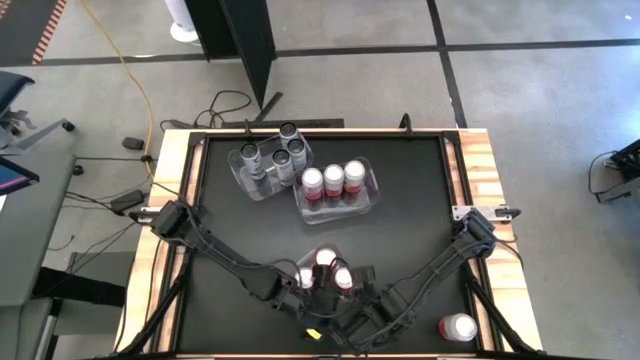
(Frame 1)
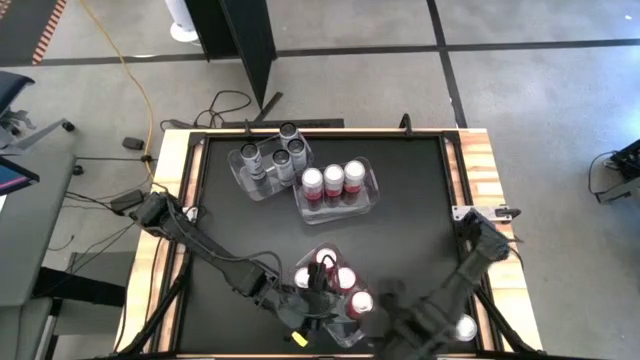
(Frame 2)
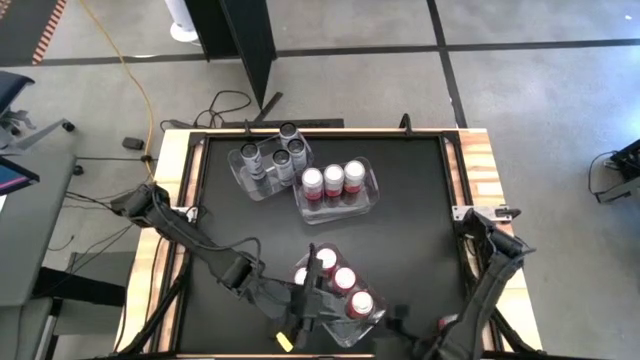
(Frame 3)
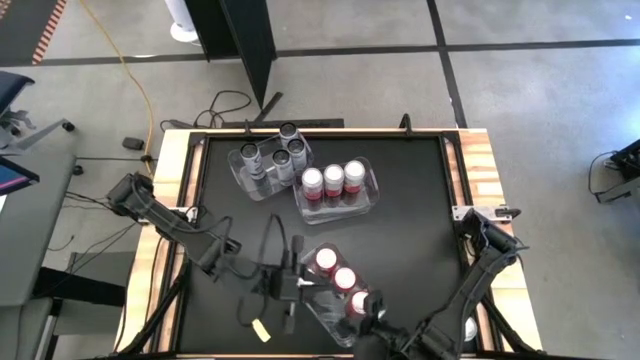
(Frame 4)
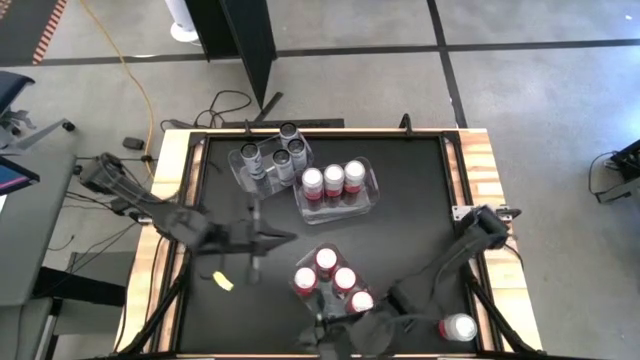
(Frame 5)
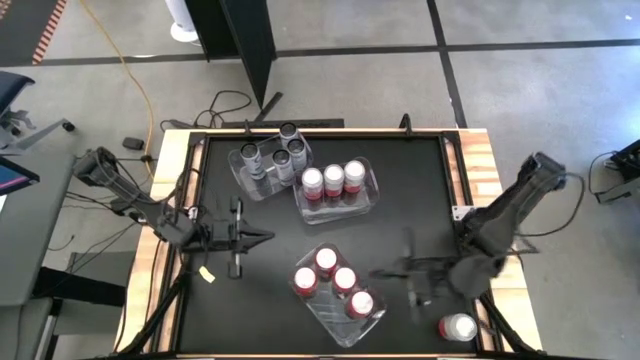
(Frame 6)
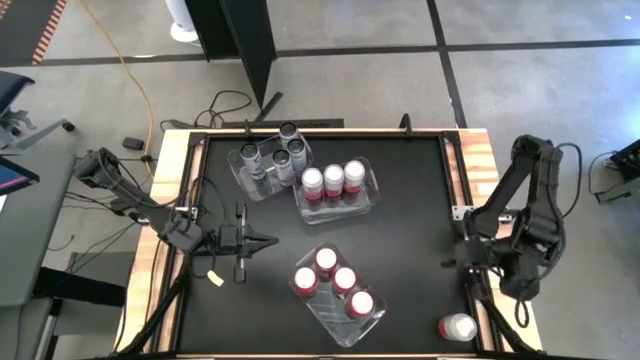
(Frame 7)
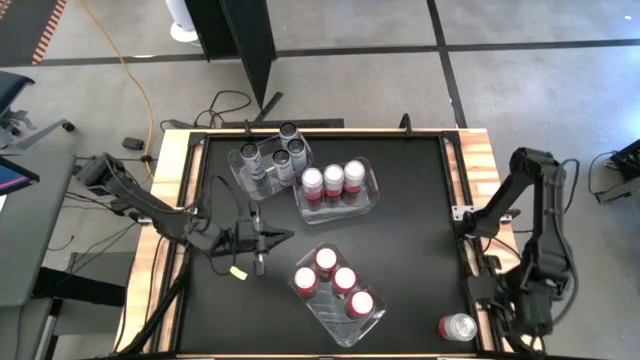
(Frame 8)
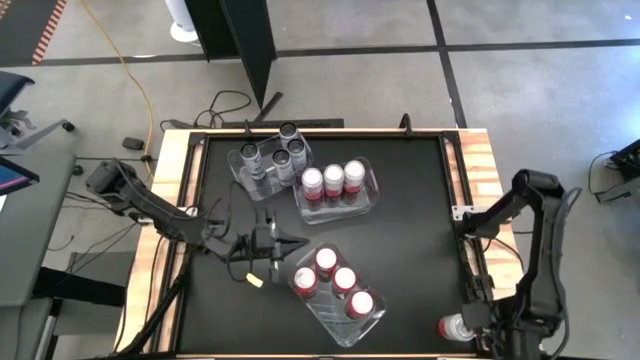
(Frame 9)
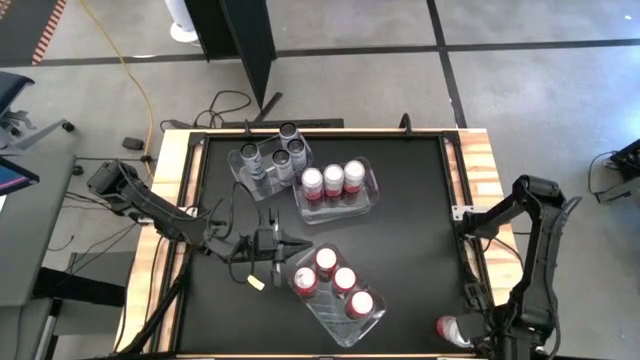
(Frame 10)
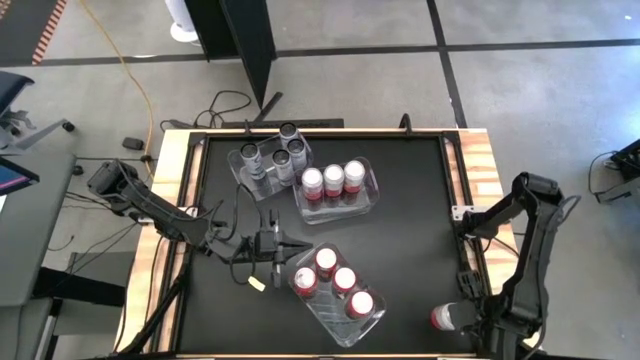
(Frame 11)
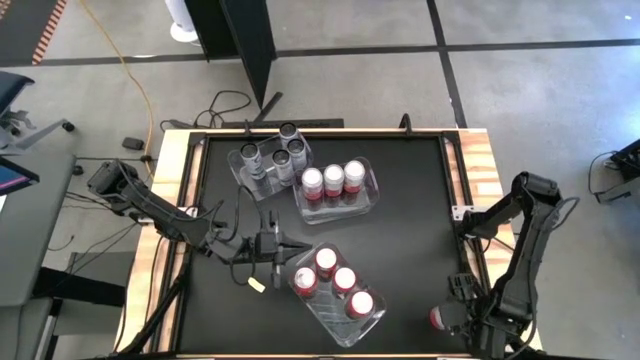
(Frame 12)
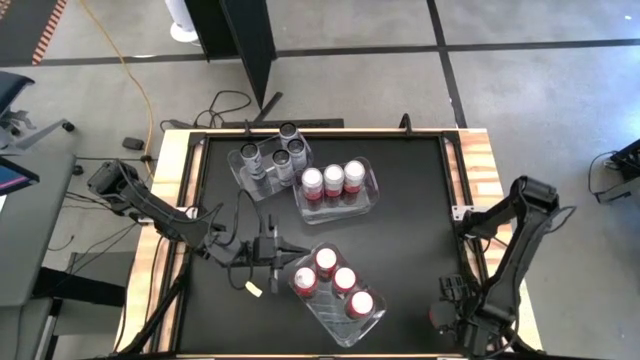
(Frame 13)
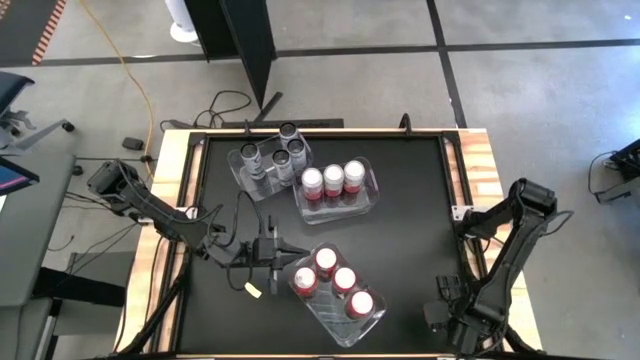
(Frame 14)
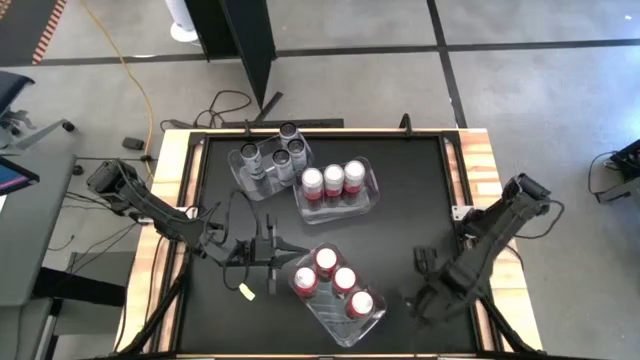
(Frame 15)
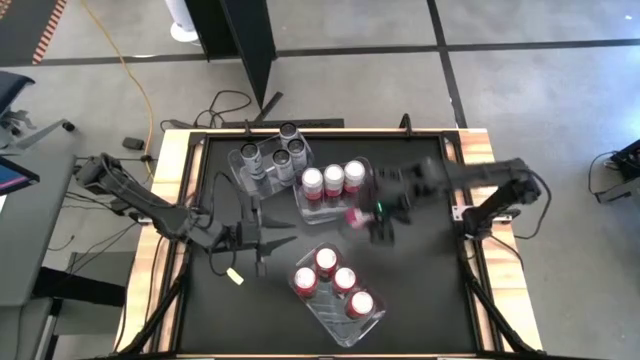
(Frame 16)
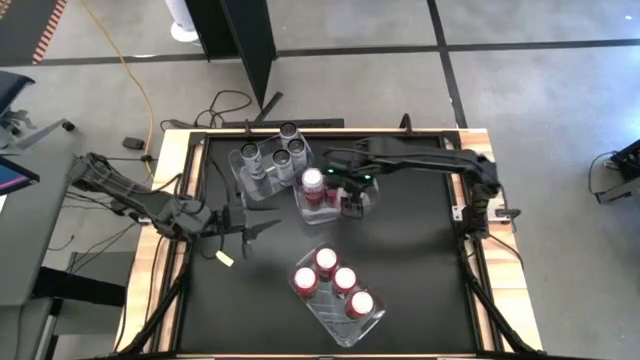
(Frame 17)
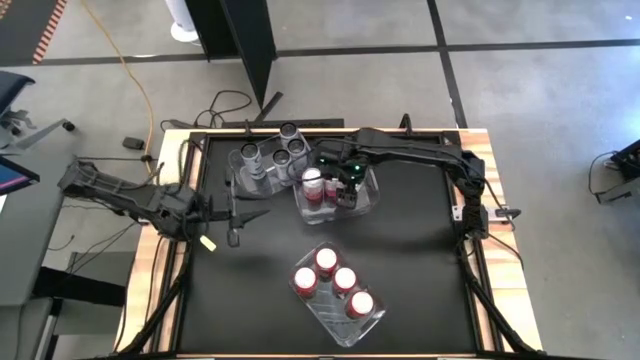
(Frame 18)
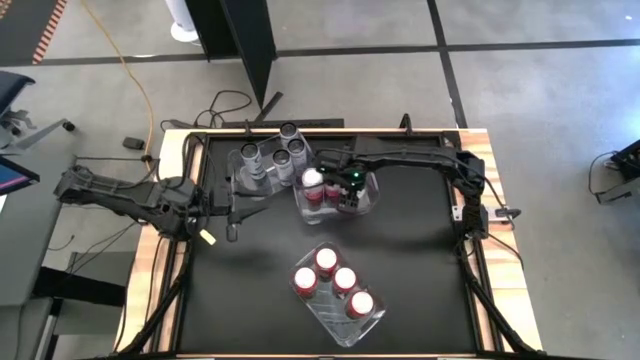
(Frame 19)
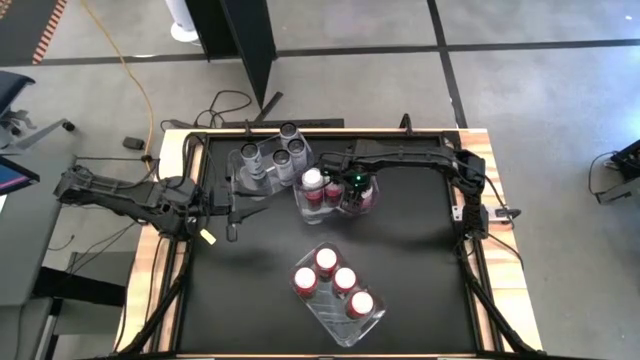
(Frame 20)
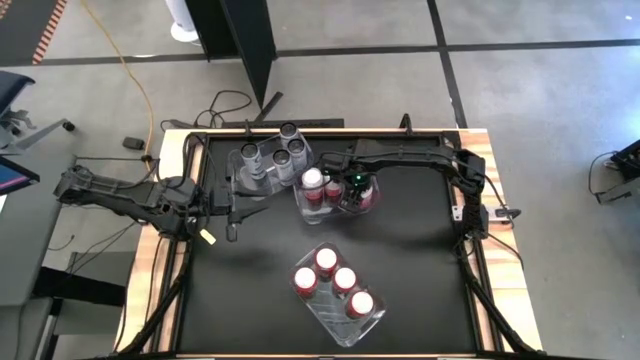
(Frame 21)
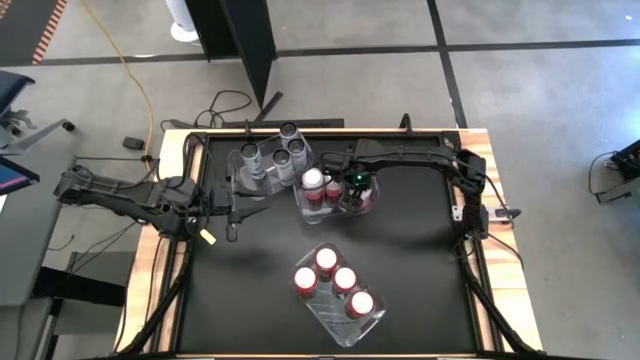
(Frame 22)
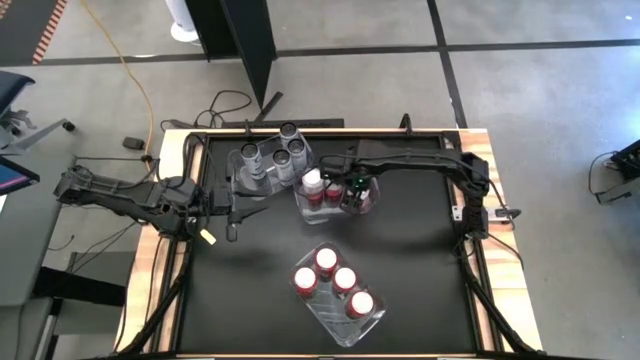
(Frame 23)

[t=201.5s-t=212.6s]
Task: Sort soda cans
Put the pink-white soda can into the middle transparent bin
